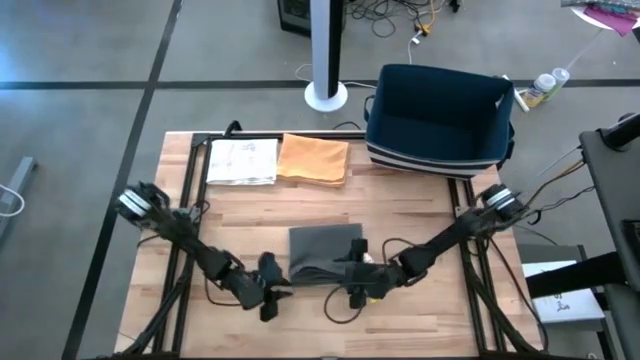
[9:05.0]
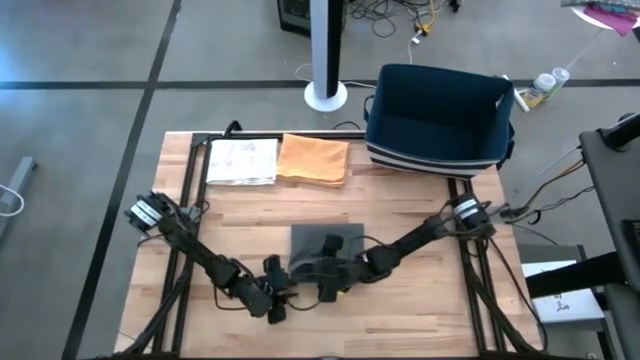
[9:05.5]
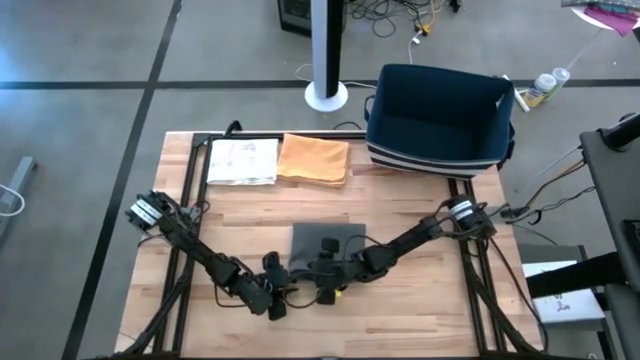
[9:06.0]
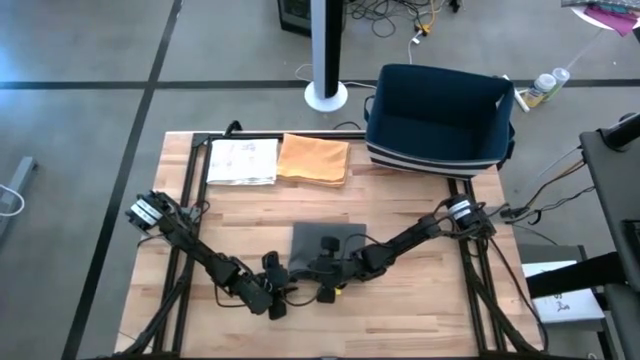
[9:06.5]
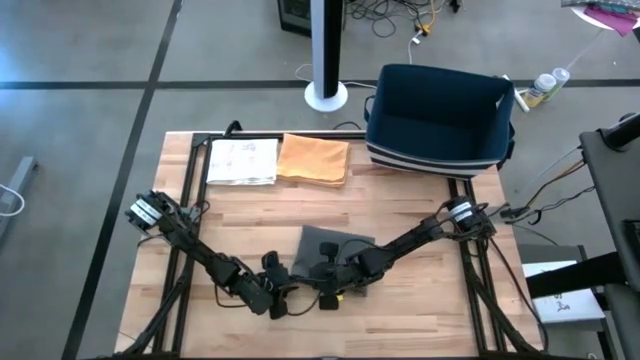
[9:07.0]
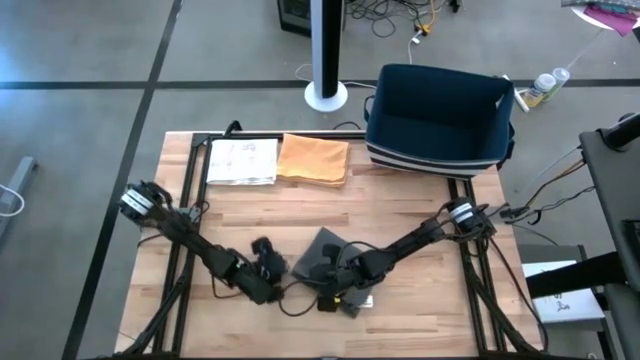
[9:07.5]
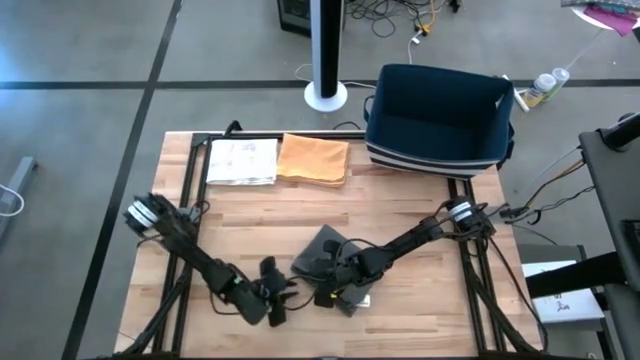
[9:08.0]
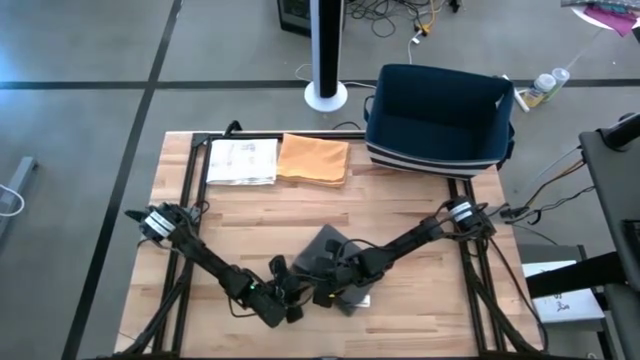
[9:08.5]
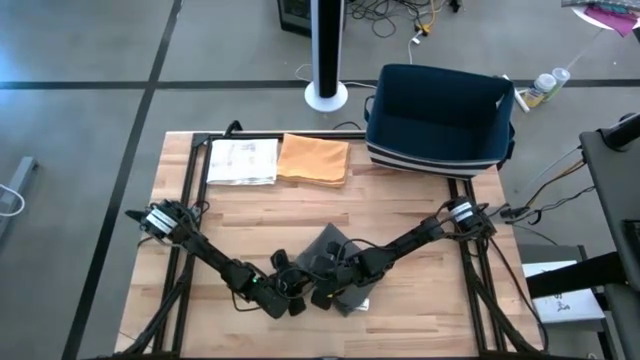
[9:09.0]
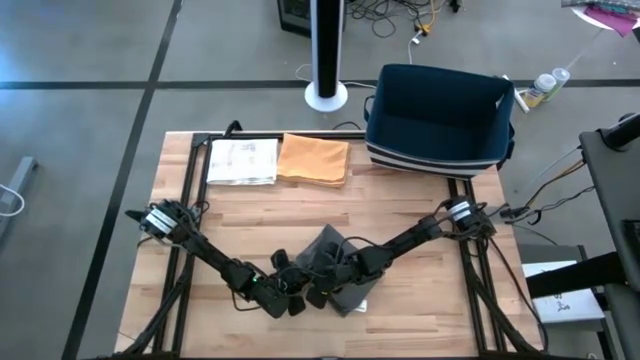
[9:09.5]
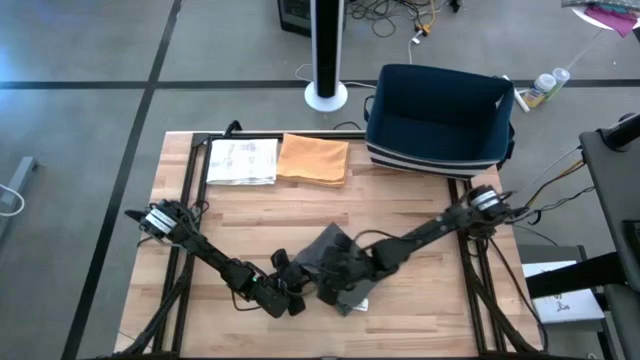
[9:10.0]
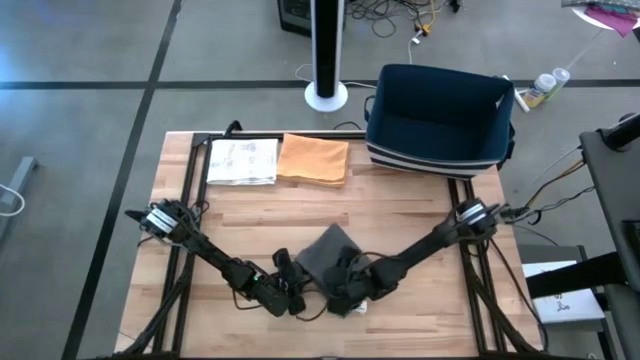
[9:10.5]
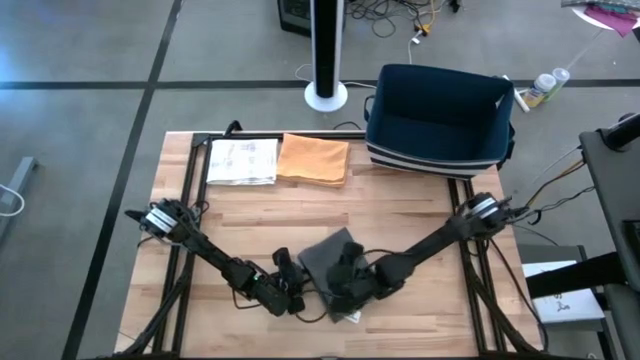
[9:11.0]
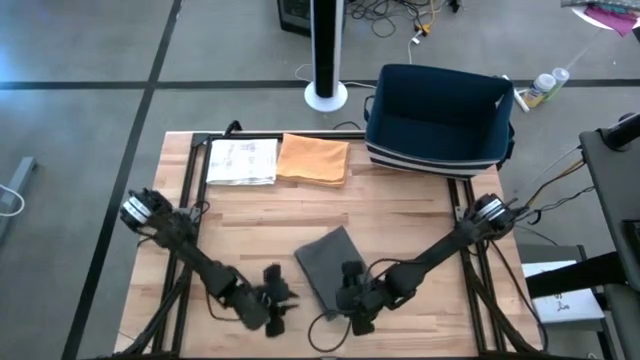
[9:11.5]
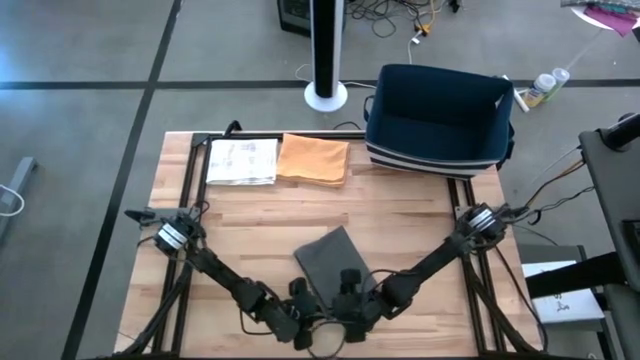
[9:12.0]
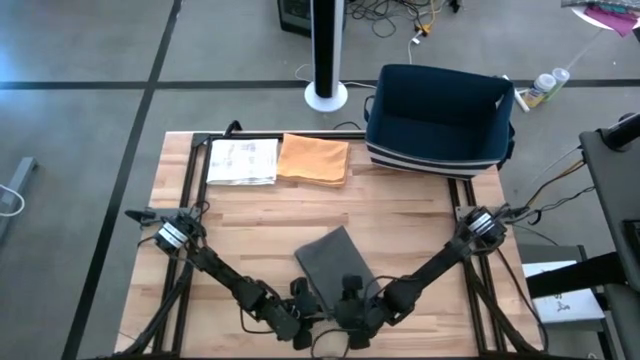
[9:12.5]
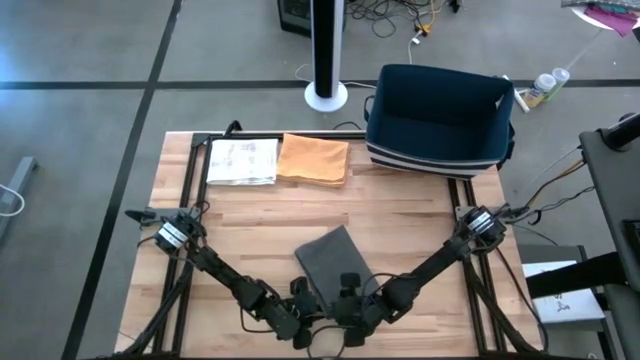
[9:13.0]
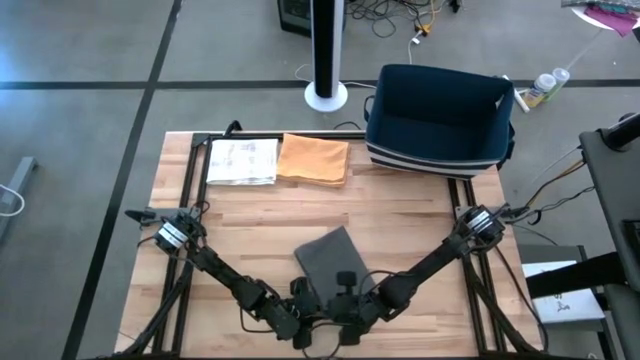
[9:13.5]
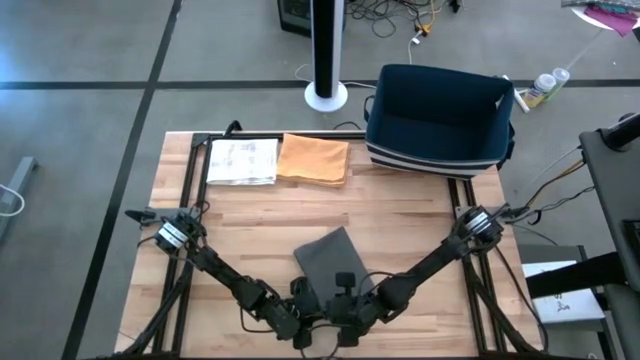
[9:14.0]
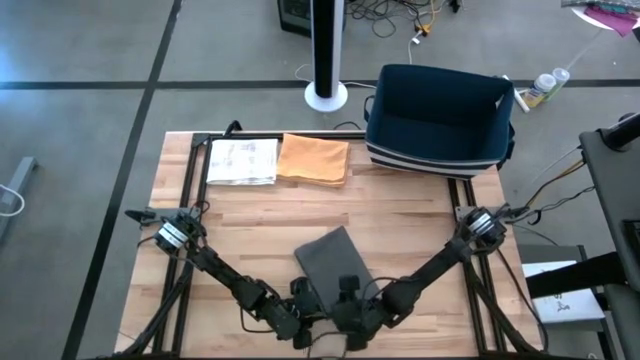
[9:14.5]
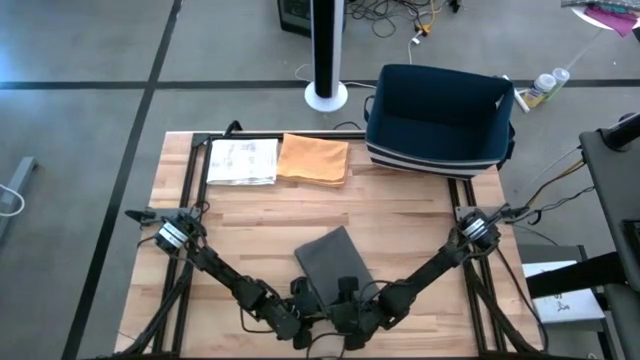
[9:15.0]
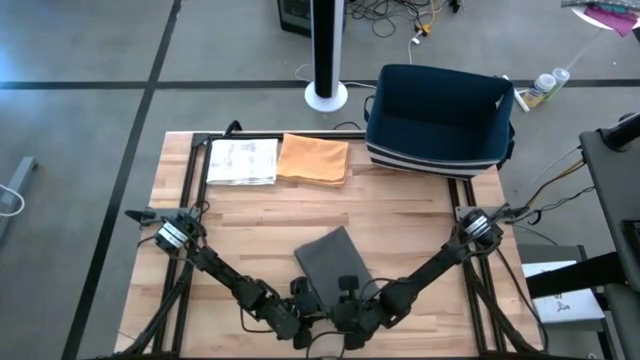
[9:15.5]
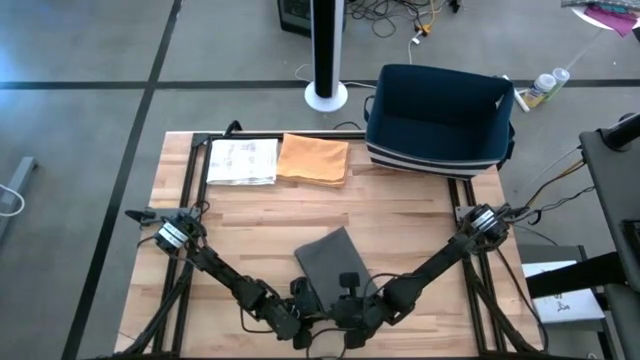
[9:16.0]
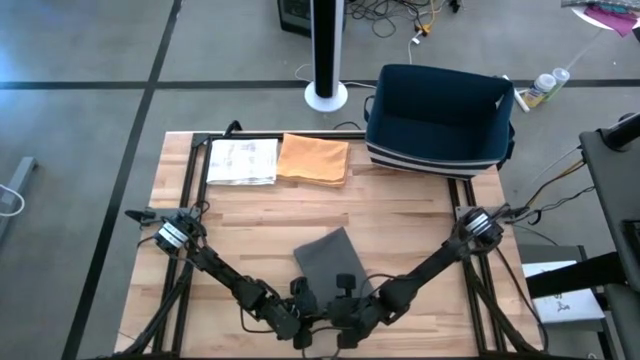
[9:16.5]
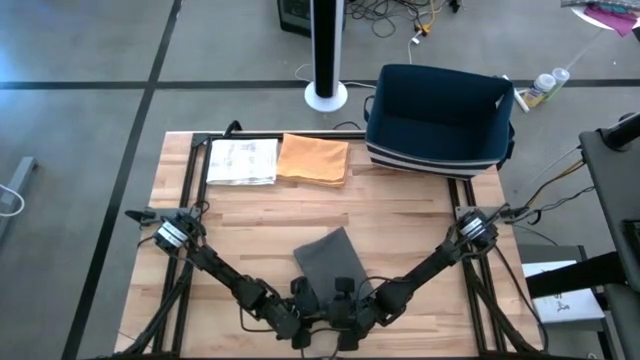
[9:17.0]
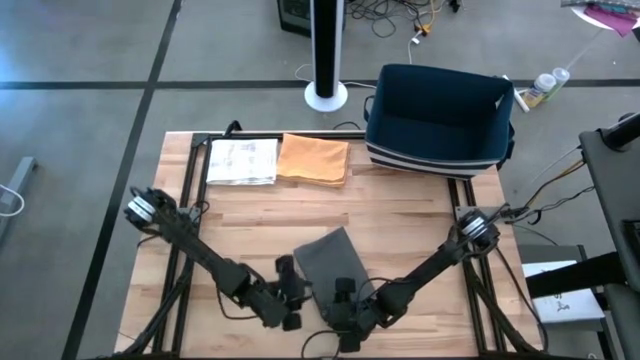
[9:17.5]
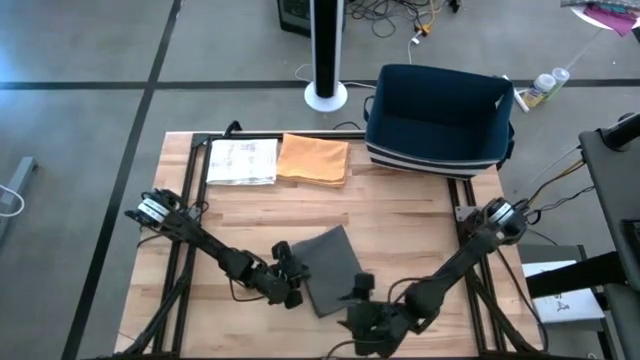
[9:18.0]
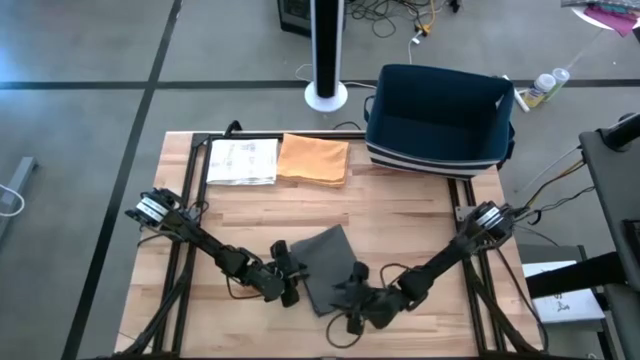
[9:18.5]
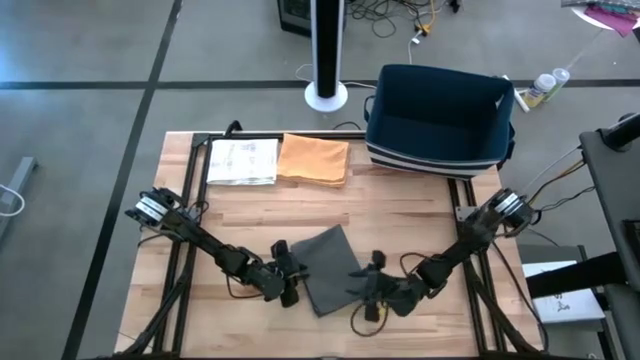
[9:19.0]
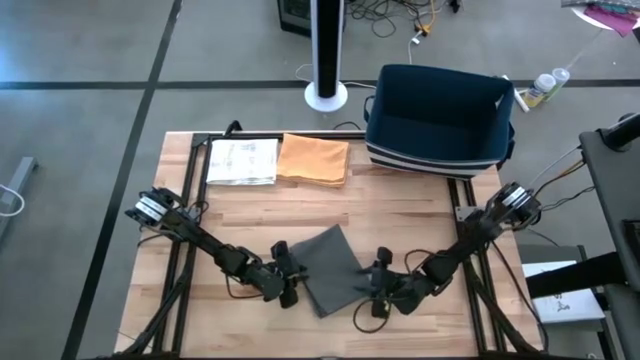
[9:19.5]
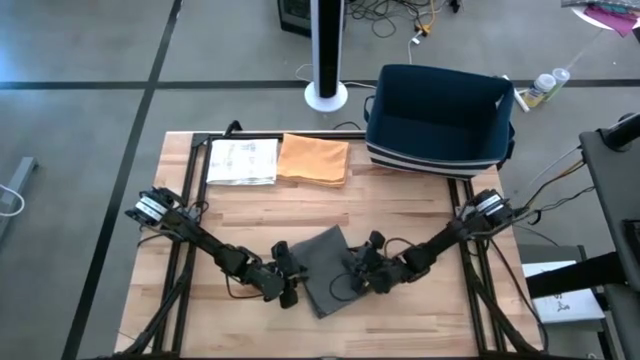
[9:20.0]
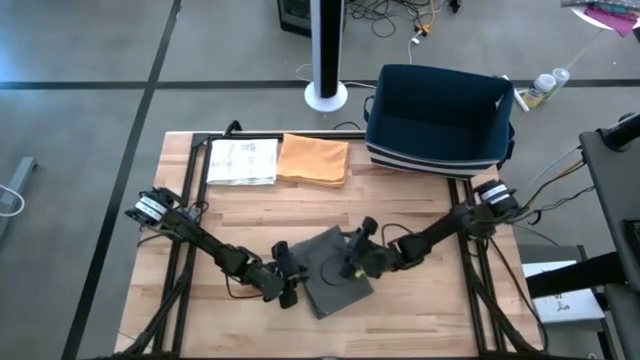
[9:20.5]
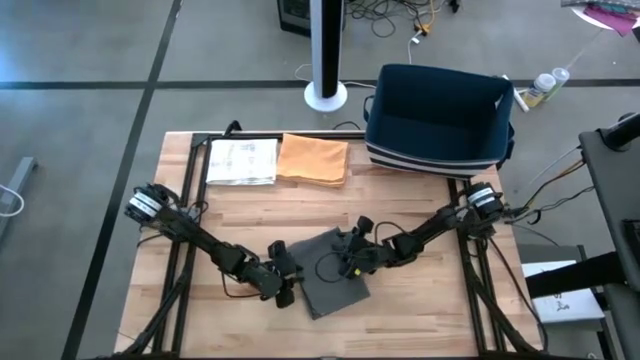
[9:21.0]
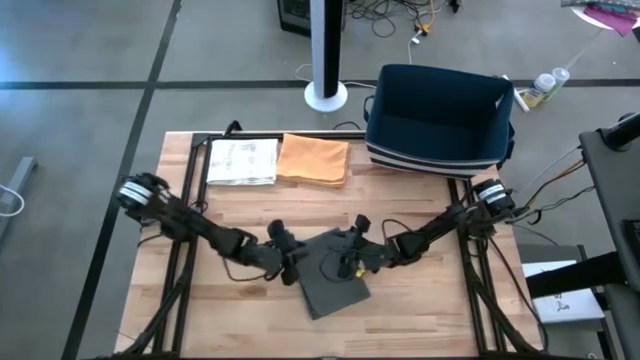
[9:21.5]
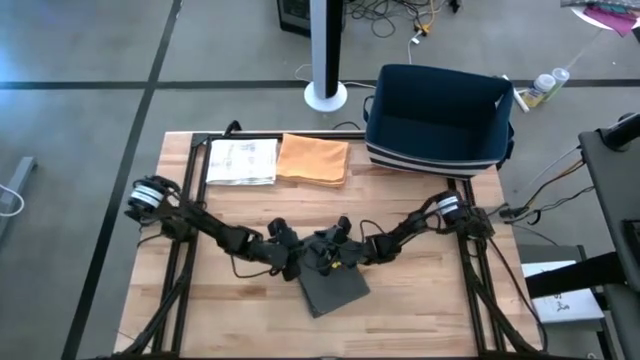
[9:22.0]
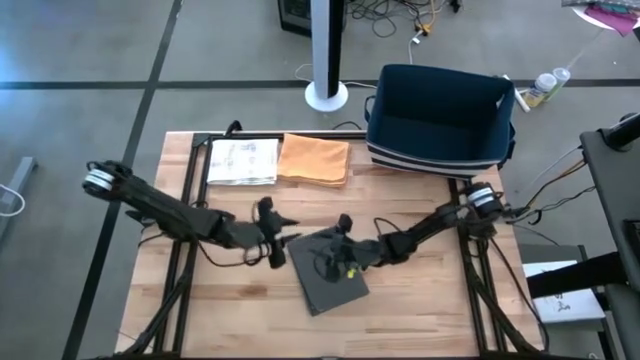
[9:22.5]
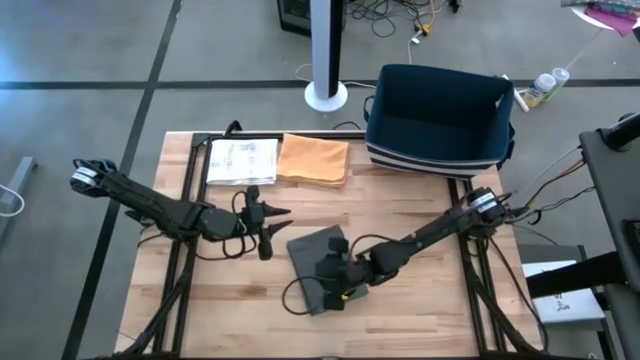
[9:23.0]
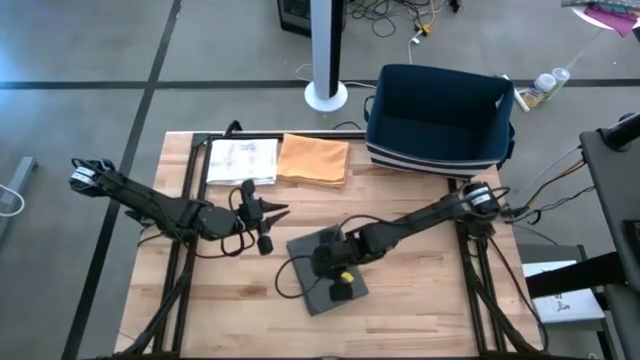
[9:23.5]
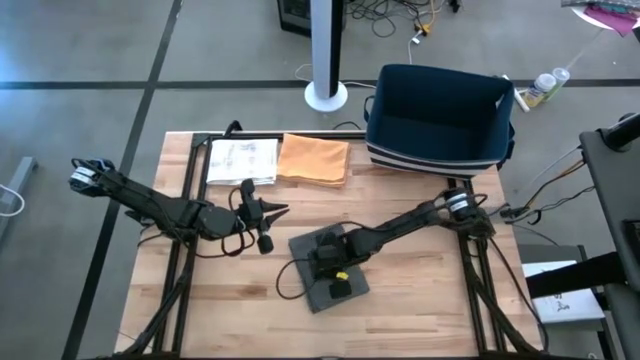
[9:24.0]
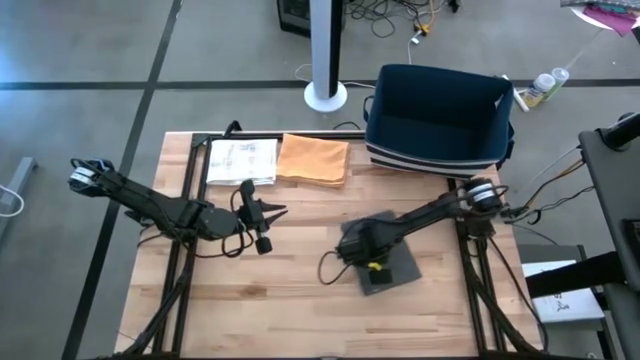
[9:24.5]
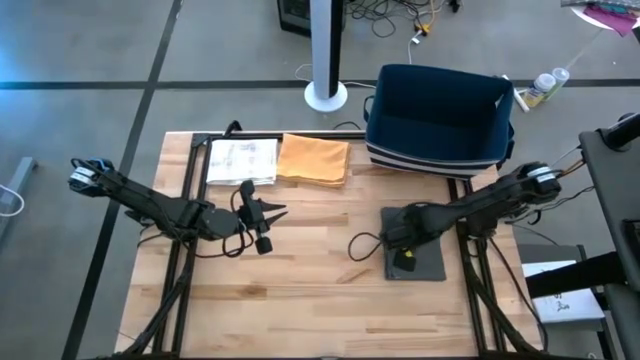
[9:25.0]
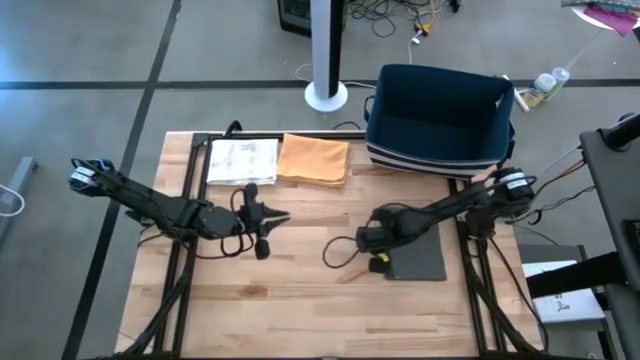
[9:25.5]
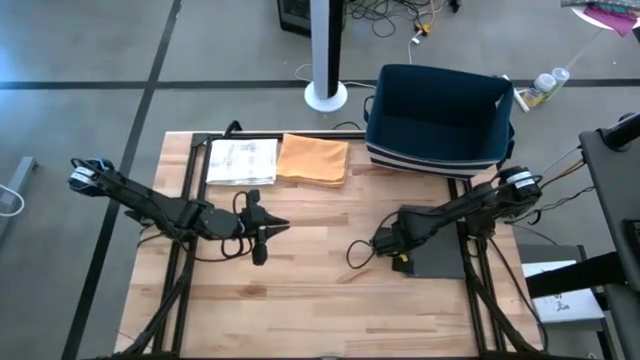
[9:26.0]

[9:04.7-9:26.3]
Task: Fold towel
Fold the black towel
